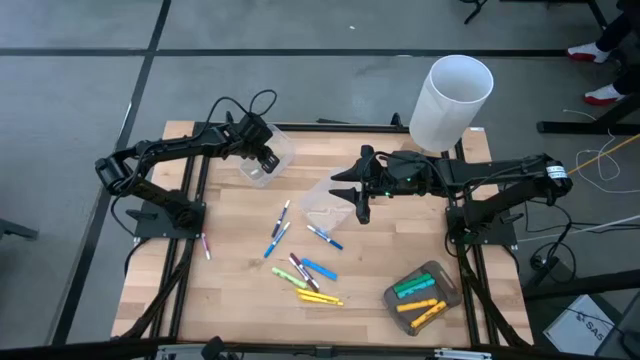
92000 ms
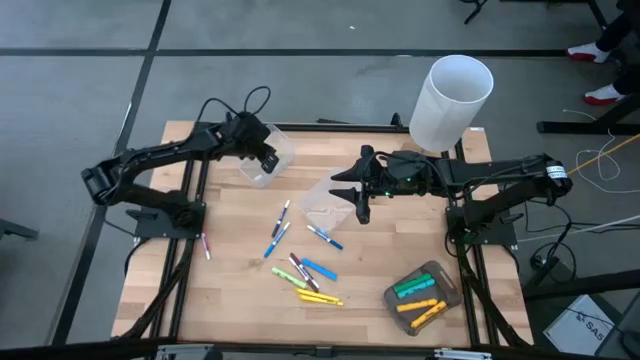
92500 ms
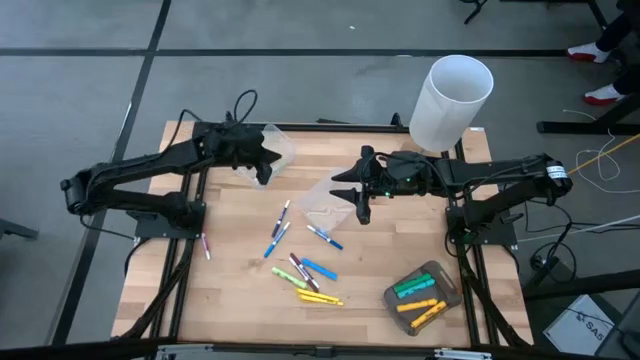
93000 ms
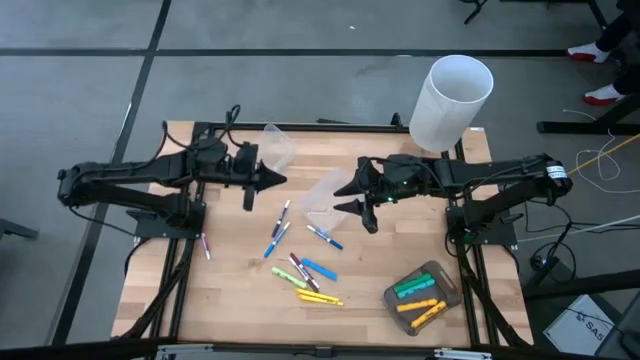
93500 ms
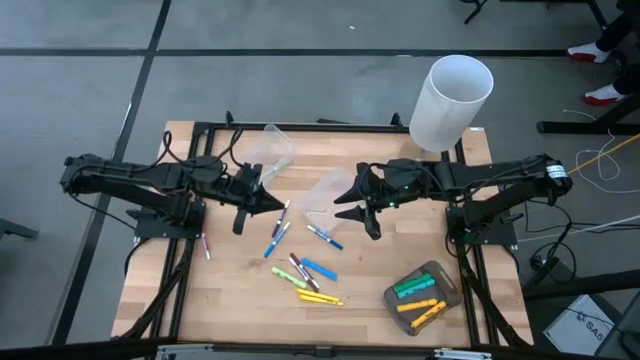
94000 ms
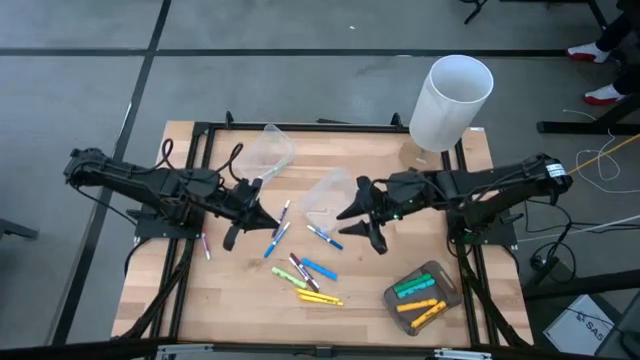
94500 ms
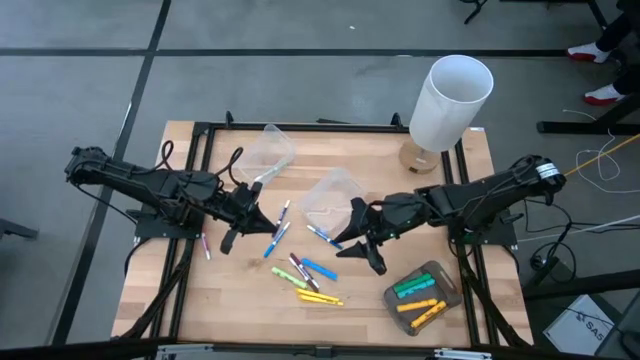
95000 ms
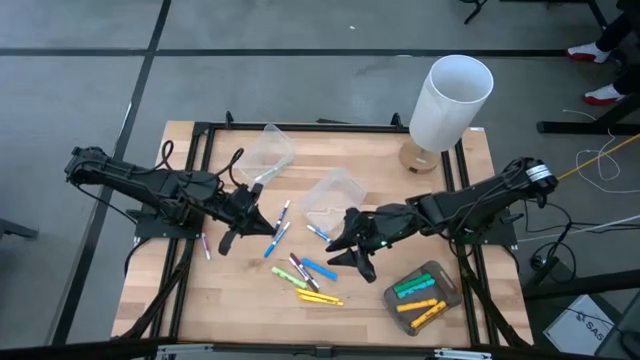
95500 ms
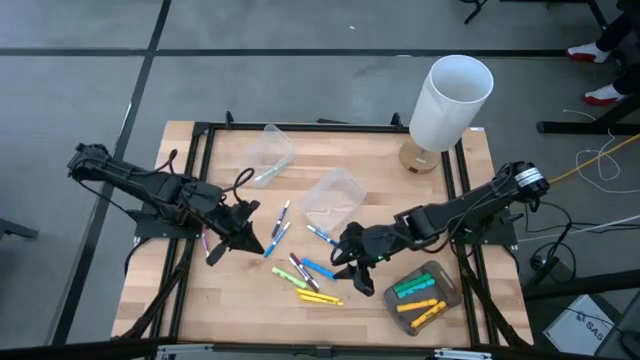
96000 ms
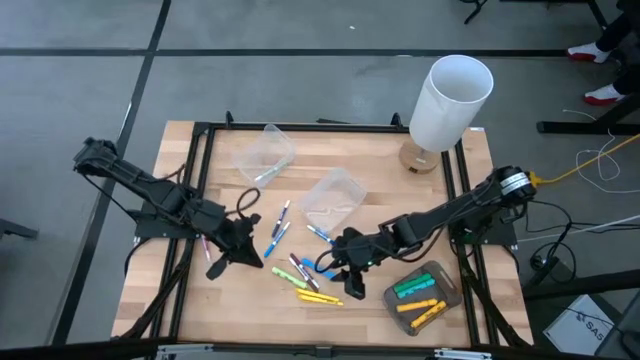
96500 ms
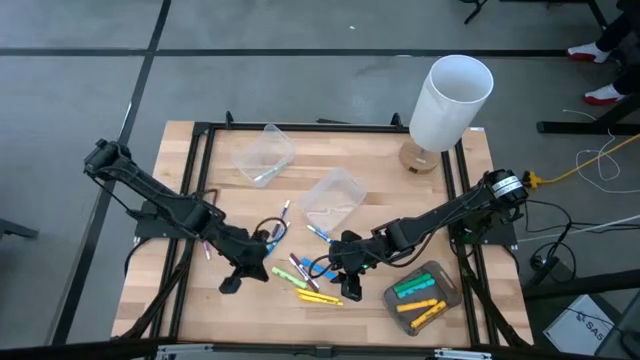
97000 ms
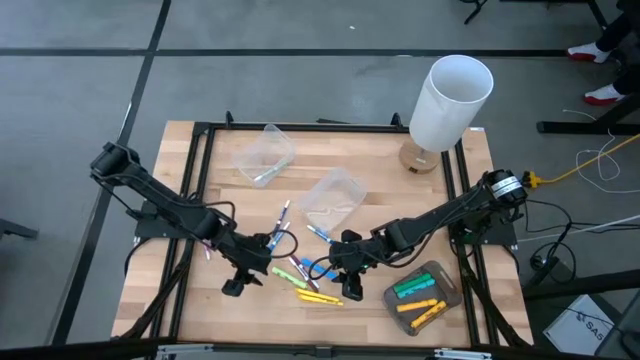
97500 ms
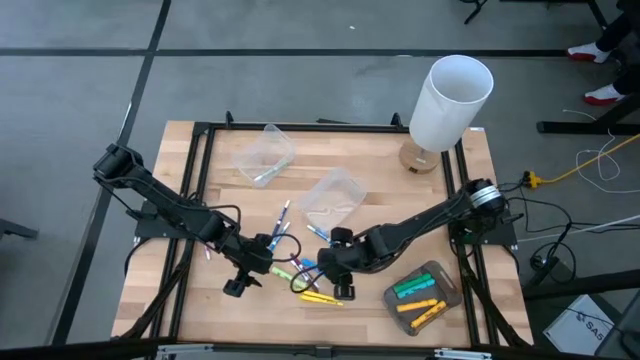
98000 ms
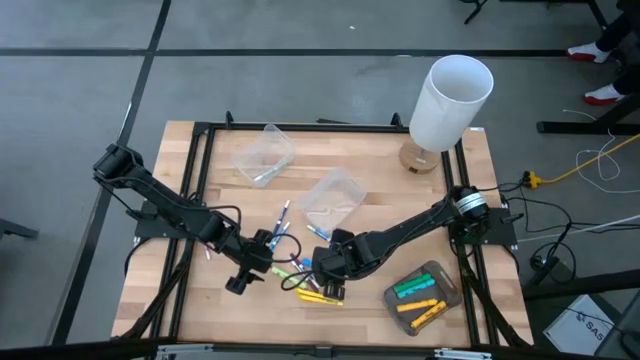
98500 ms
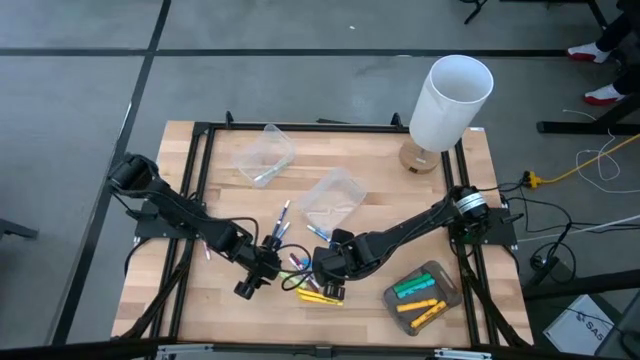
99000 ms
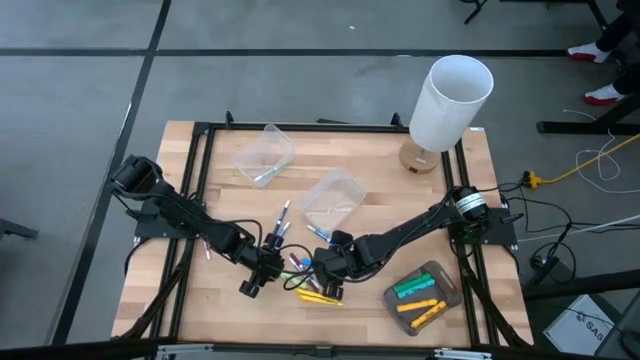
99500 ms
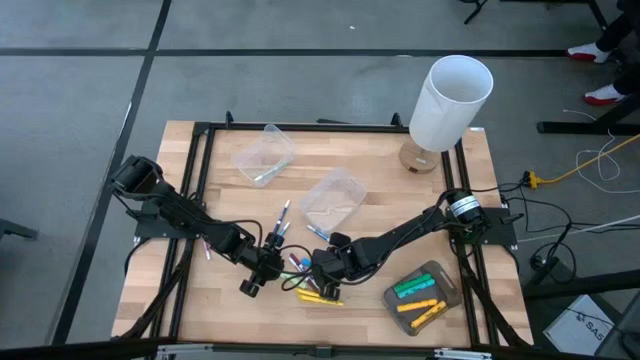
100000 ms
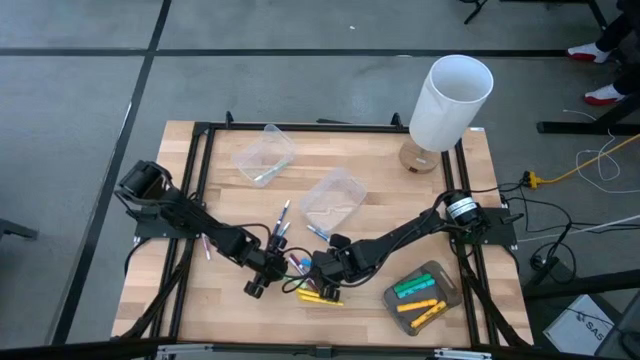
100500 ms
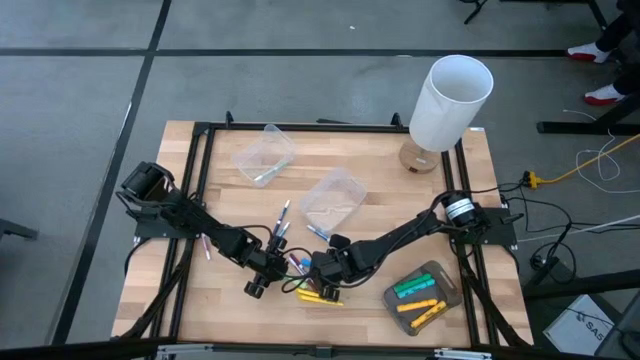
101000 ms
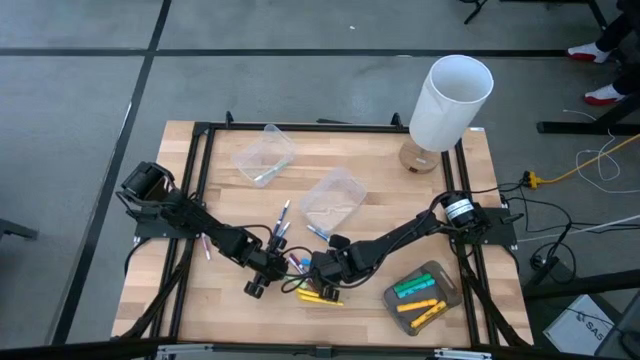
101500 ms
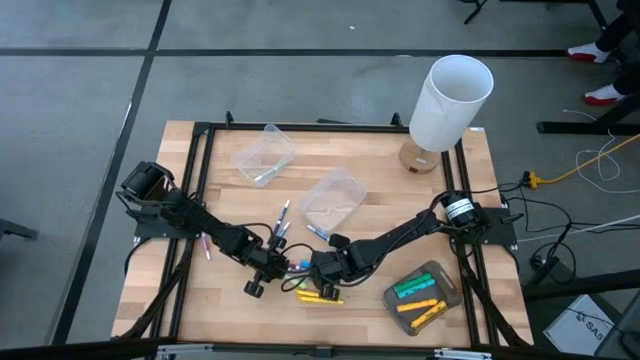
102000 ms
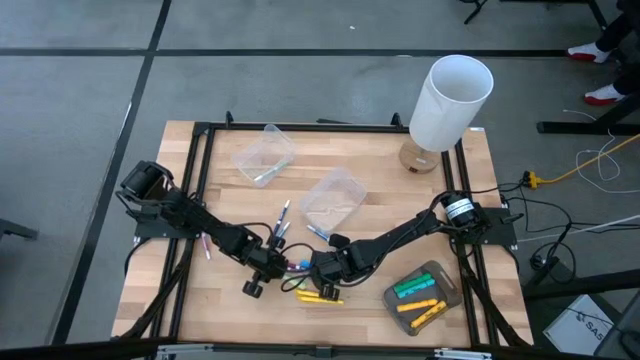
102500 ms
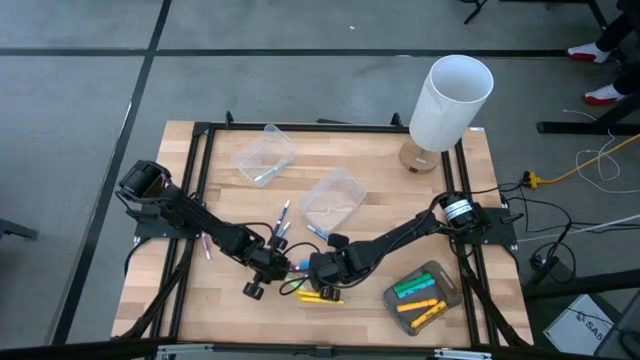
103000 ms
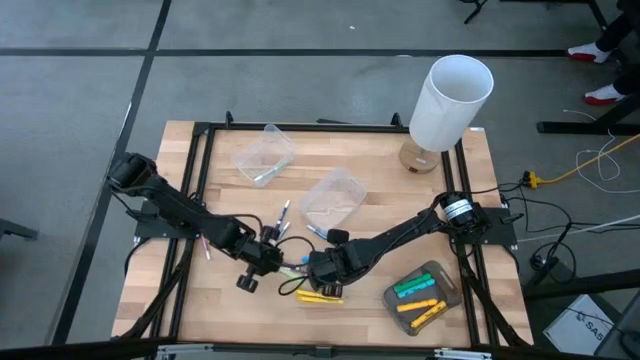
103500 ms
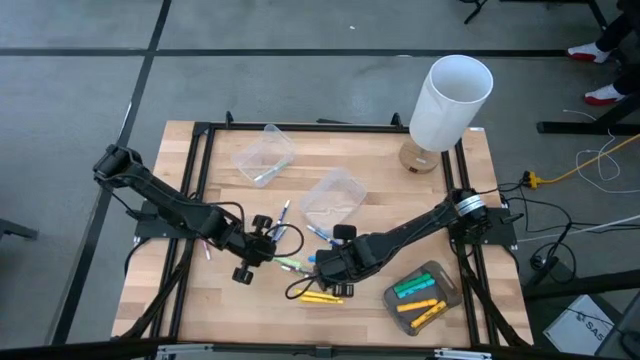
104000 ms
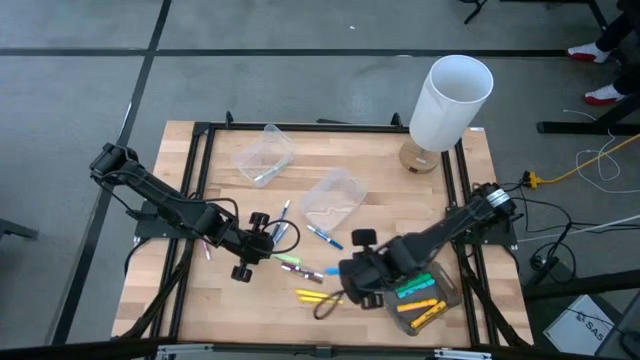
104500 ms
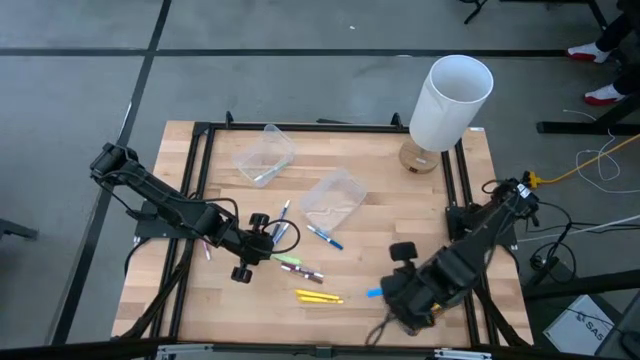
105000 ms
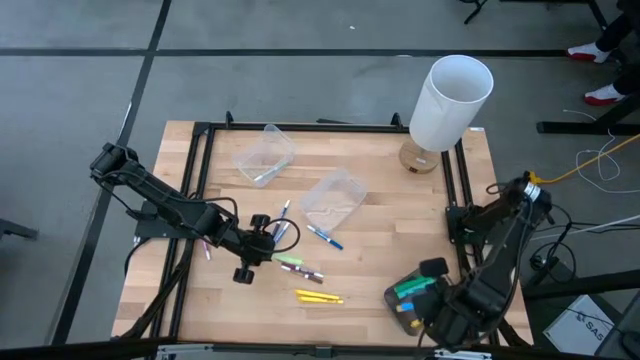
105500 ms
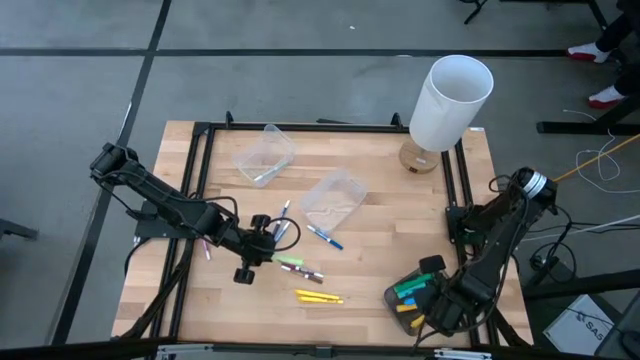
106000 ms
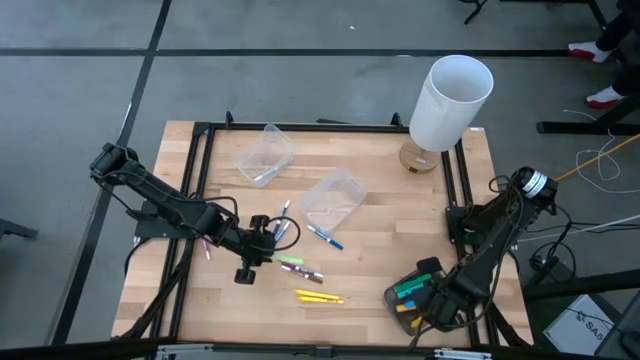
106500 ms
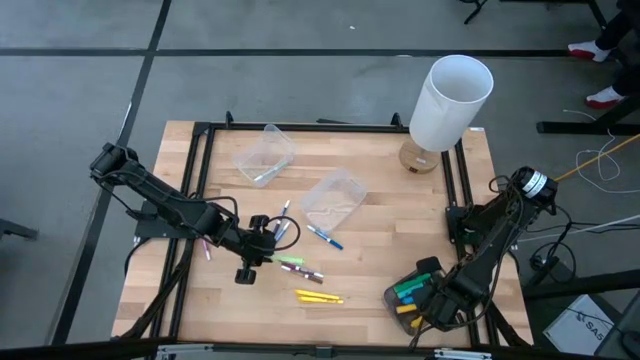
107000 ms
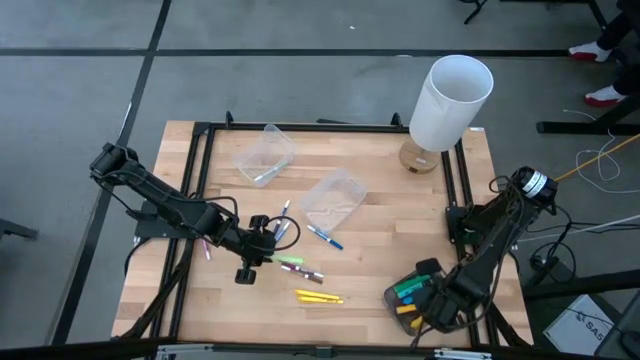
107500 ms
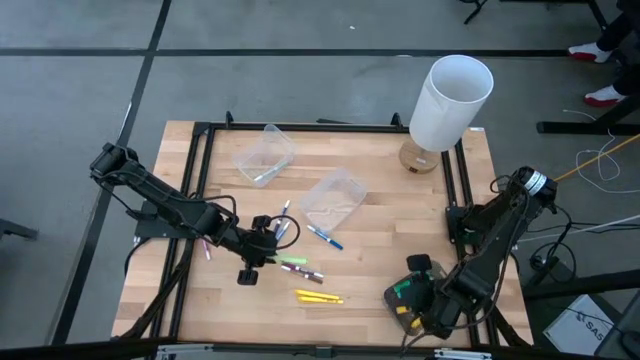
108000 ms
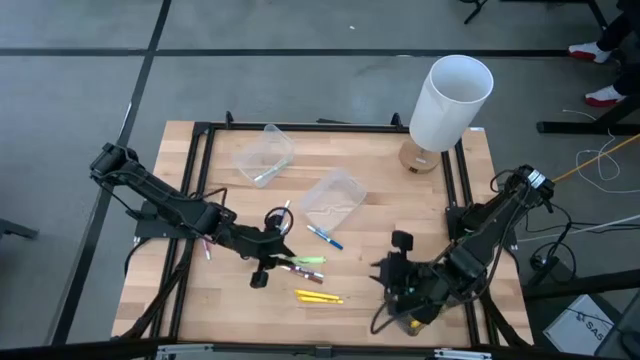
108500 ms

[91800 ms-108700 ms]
Task: Pick & Place Markers
Put the light green highlighter into the black bin

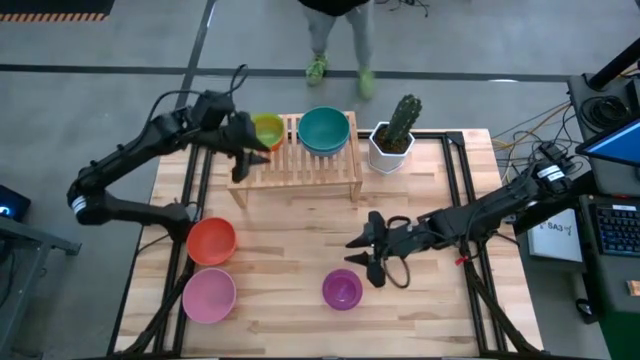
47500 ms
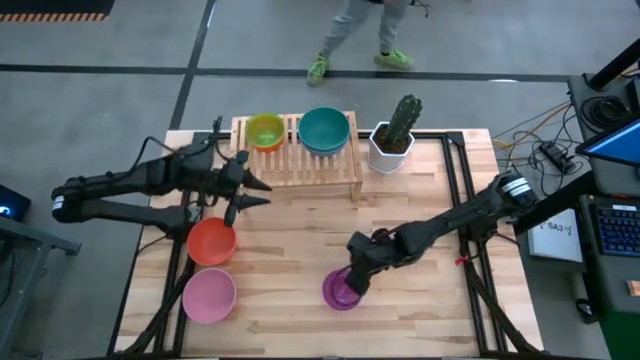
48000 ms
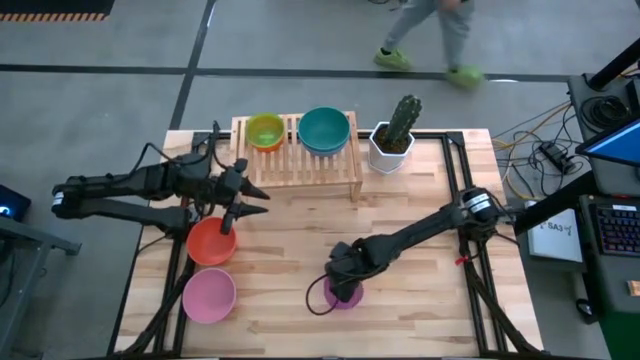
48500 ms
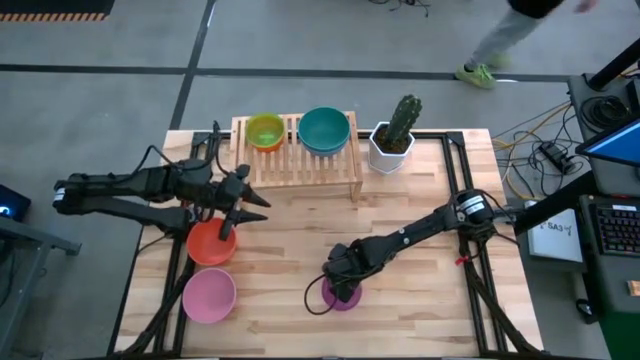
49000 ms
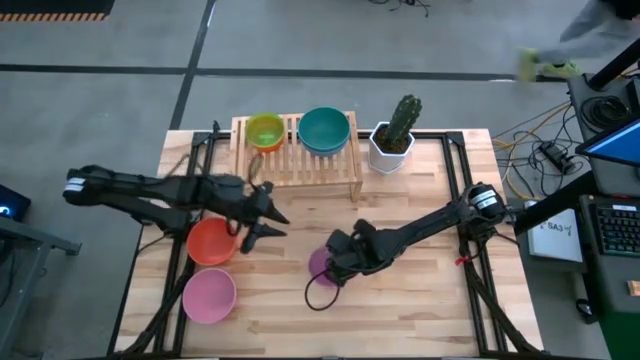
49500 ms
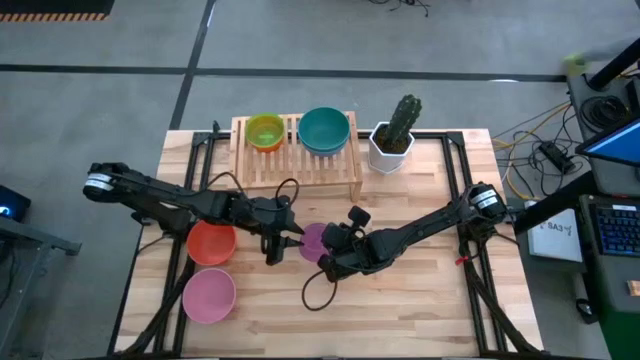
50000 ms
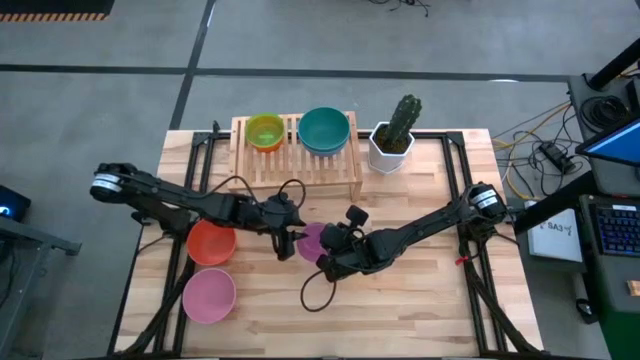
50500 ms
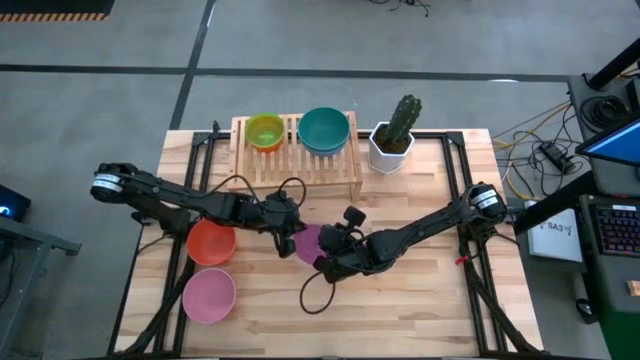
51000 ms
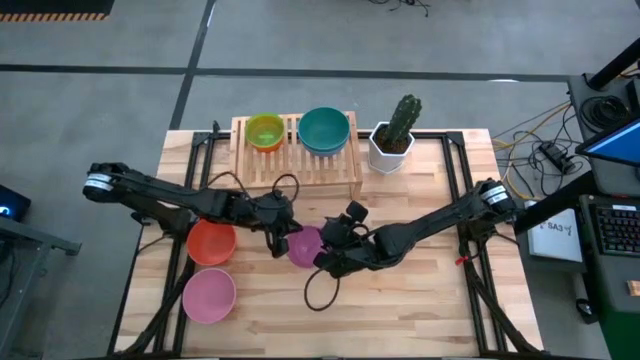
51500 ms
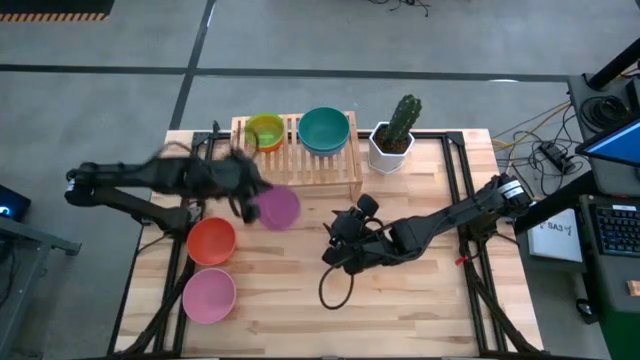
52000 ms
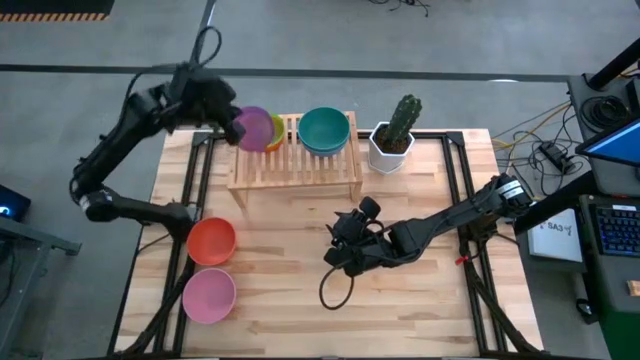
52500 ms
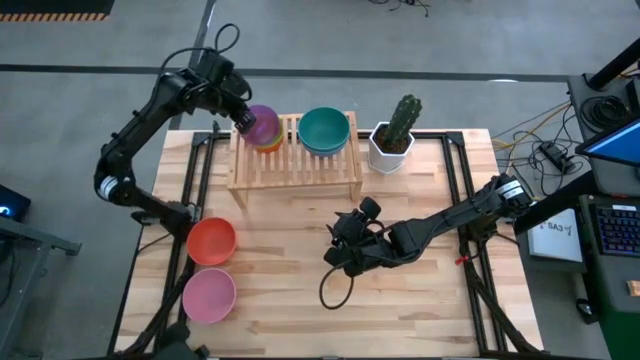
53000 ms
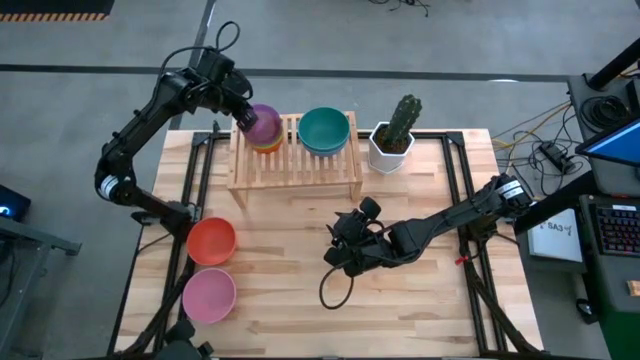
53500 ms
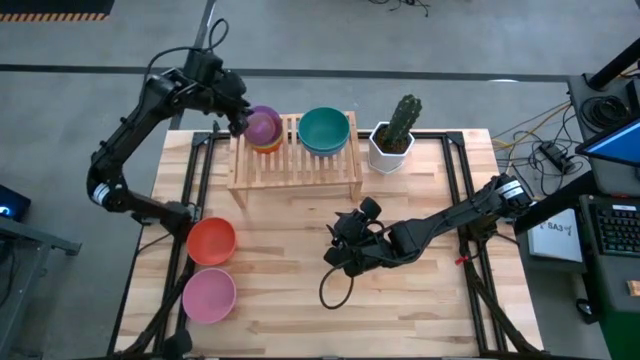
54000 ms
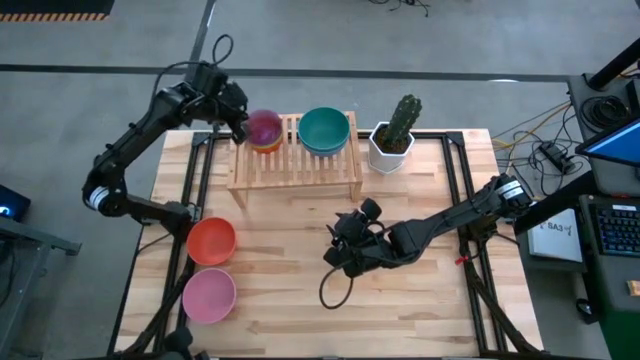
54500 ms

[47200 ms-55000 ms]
Task: Place and stack bowls onto a shelf
Stack the purple bowl on top of the green bowl
